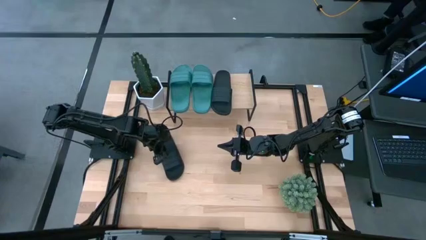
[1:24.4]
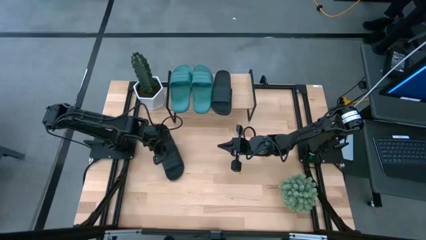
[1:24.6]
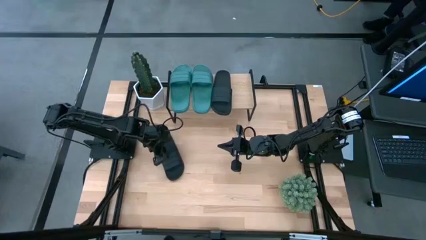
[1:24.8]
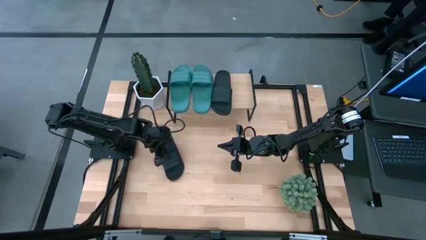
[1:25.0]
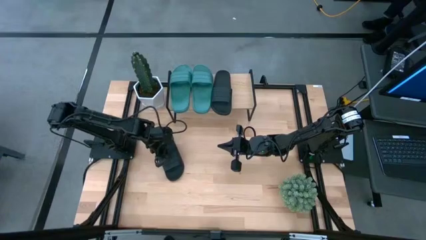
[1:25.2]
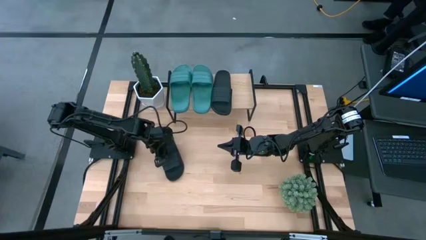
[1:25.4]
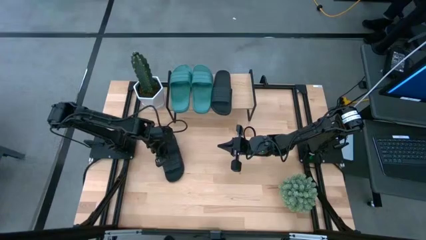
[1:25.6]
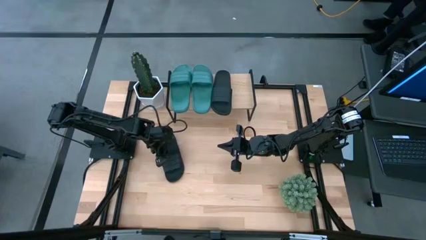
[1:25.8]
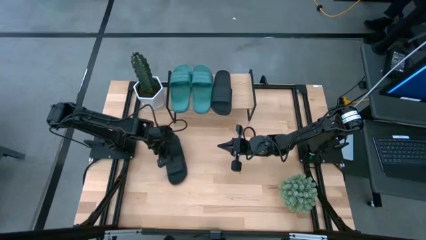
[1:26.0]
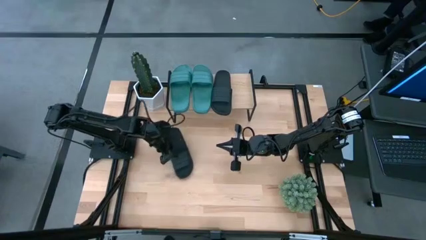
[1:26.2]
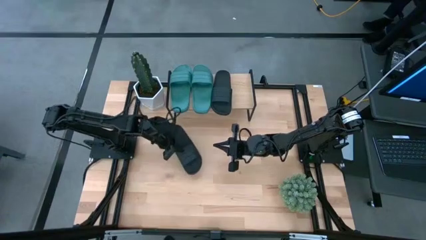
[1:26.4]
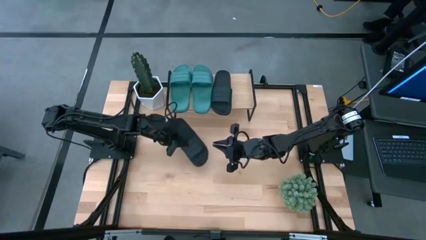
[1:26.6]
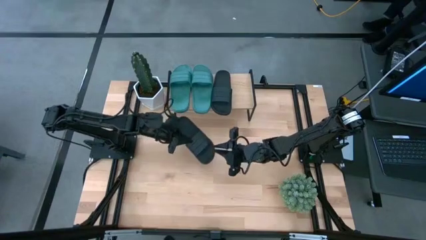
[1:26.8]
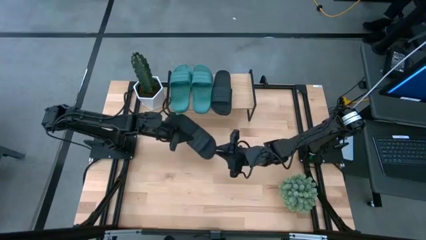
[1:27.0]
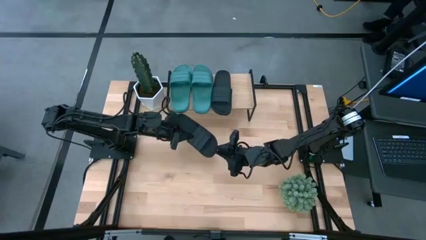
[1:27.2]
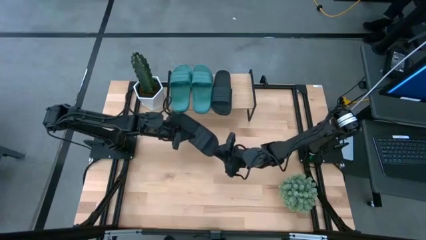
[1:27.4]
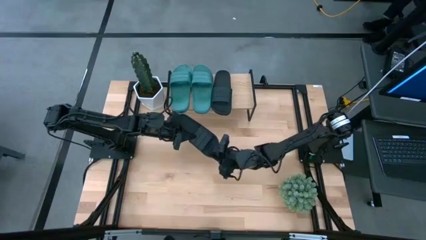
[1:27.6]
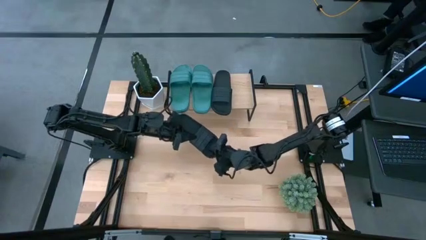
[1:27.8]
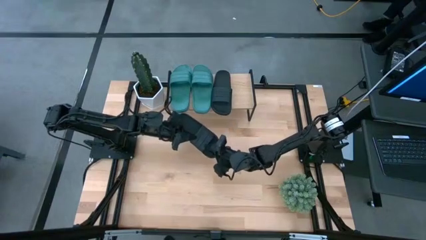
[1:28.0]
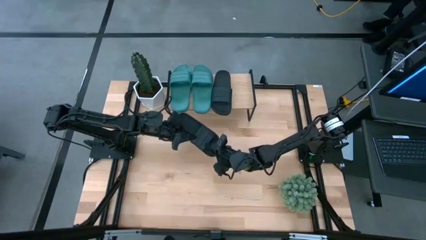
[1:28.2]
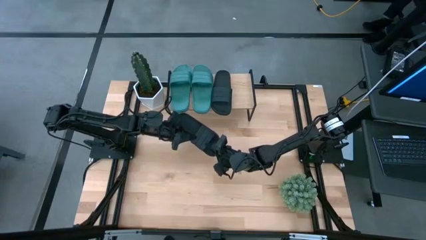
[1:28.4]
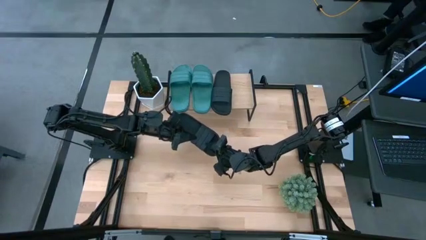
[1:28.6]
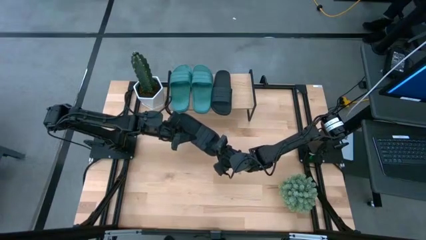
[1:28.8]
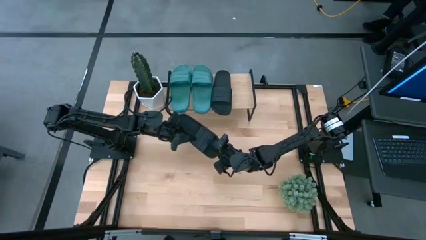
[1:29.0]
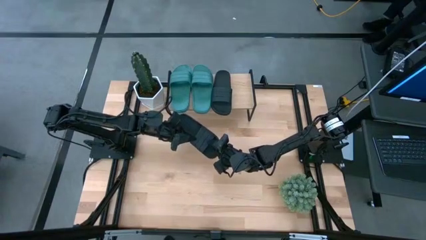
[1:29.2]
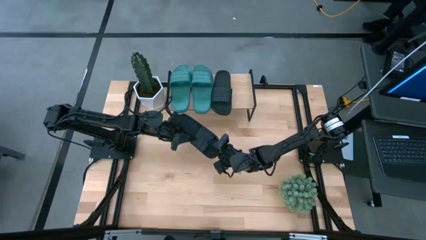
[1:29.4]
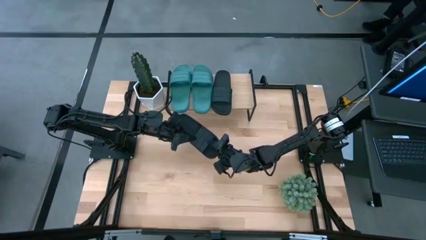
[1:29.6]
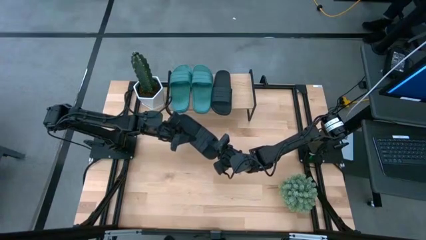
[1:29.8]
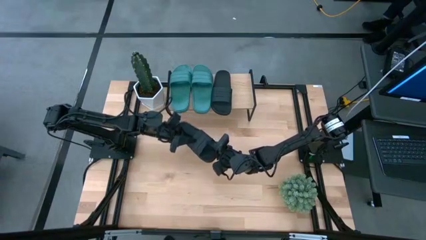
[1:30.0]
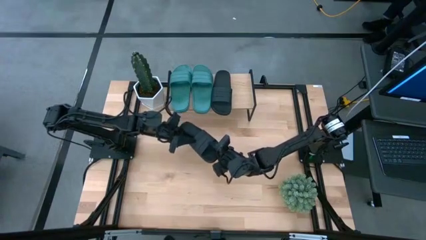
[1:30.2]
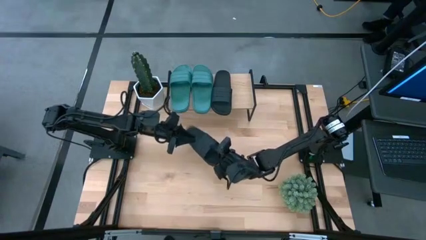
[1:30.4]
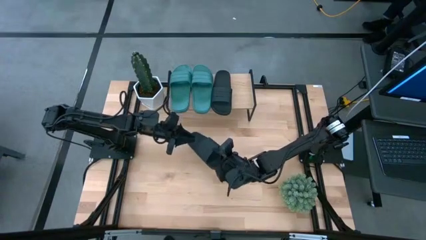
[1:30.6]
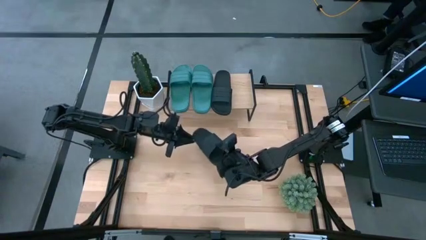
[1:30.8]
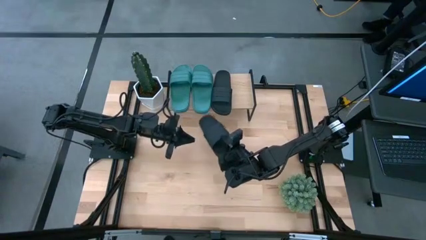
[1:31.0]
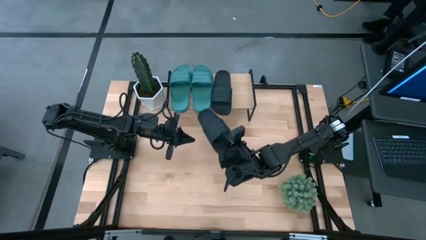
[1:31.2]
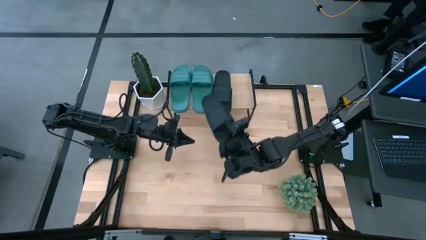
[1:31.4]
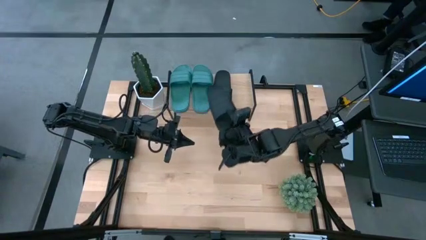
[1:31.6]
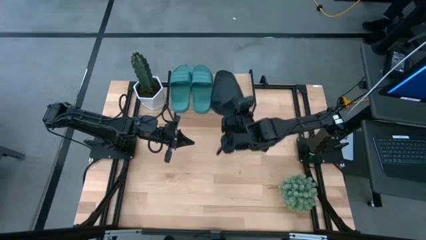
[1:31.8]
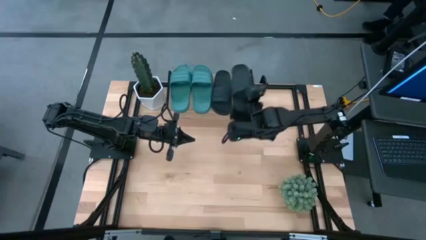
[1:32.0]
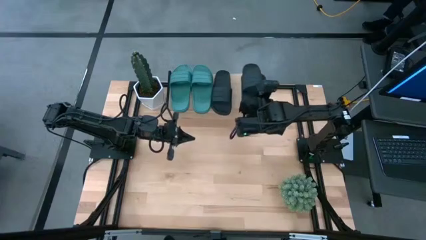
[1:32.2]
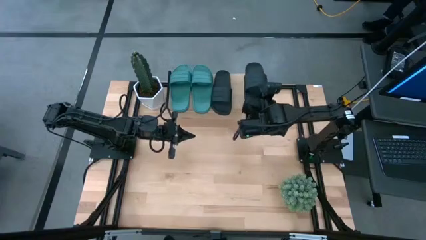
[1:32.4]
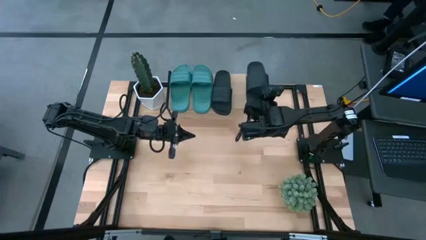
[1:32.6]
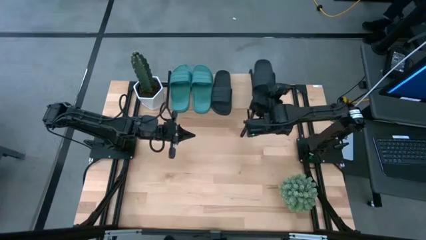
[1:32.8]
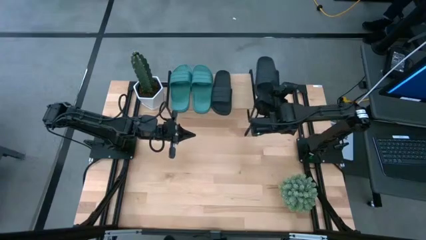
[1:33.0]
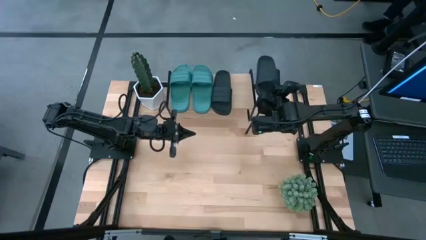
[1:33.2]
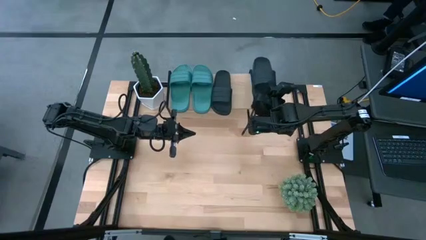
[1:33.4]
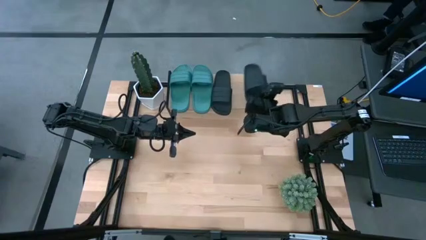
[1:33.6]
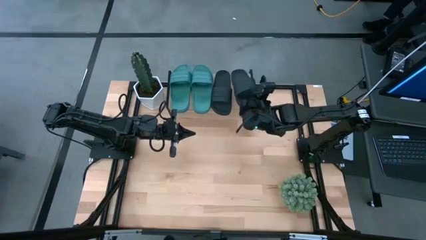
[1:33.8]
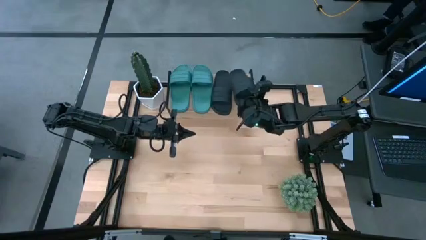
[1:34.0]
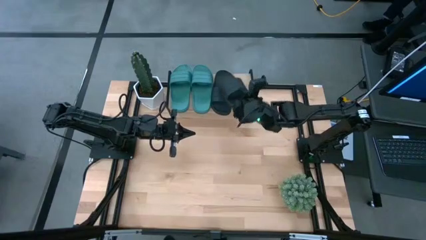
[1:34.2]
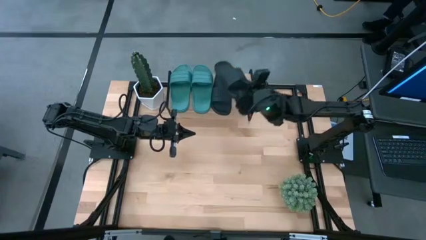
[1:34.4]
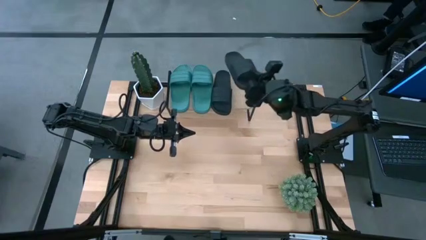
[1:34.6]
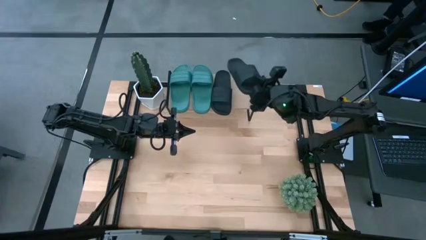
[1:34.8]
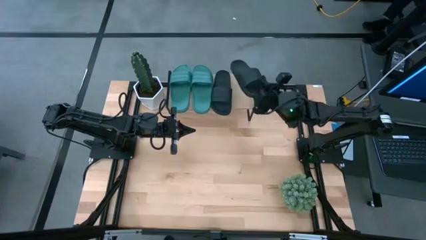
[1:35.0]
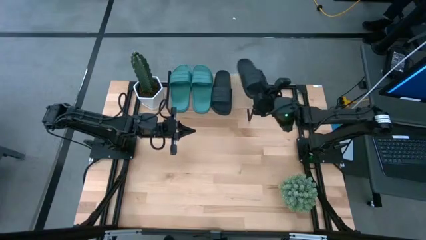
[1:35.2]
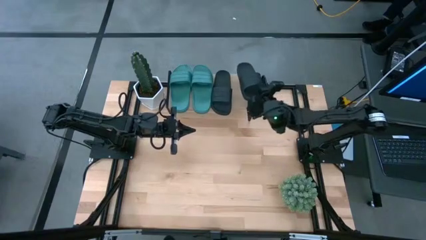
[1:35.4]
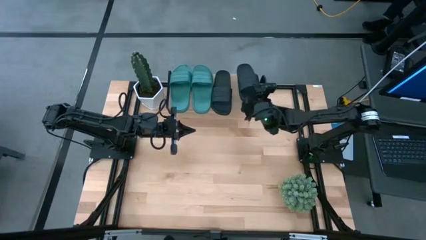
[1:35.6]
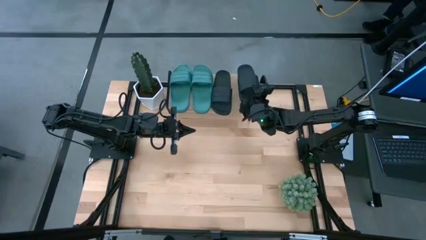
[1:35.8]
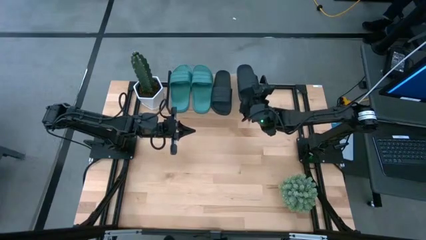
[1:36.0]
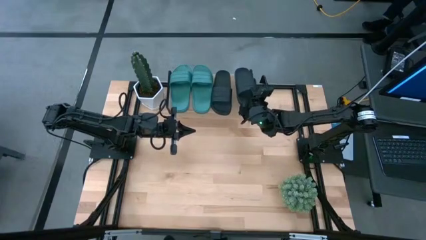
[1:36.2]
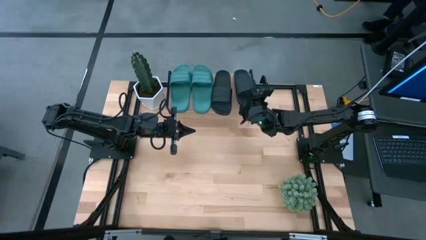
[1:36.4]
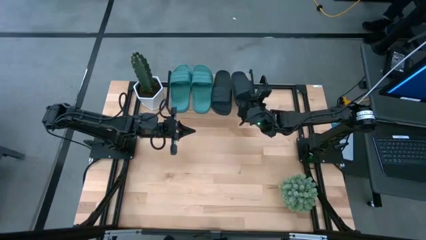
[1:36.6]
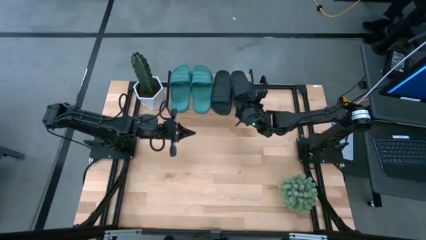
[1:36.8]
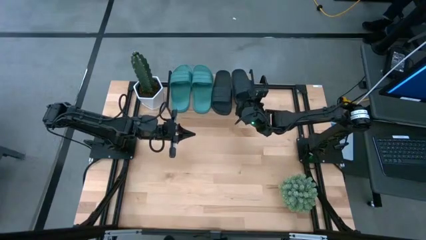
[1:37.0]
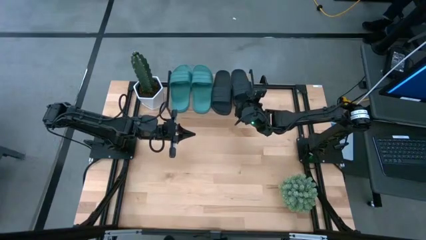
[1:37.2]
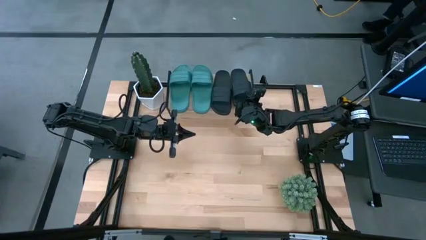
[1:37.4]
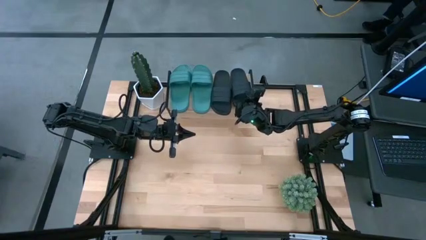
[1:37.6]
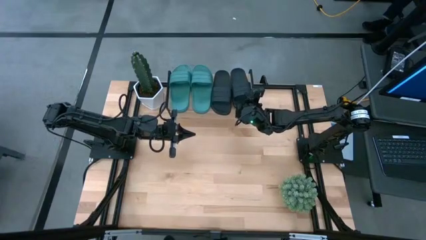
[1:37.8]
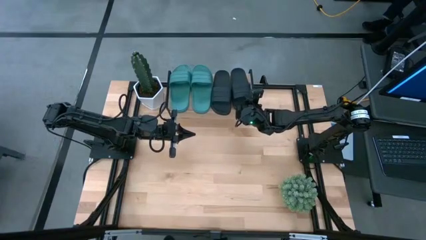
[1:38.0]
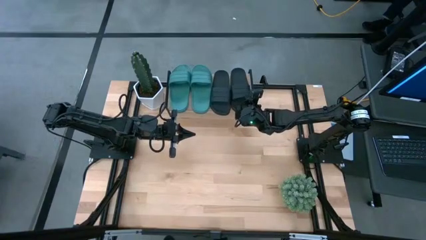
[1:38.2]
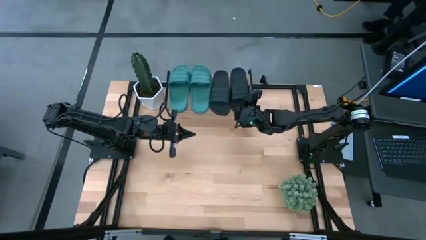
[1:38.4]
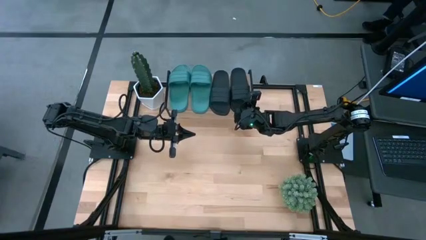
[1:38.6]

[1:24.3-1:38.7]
Task: Pick and place slides into the shelf
Put the black slipper on the shelf
